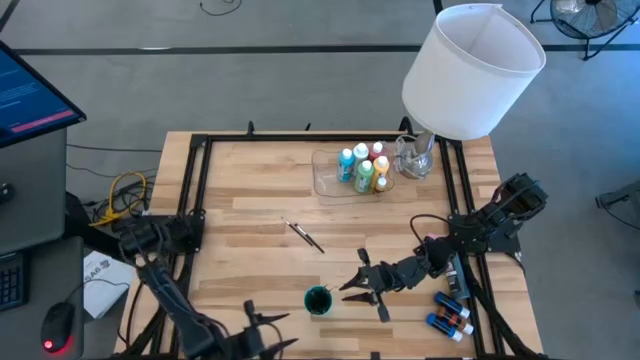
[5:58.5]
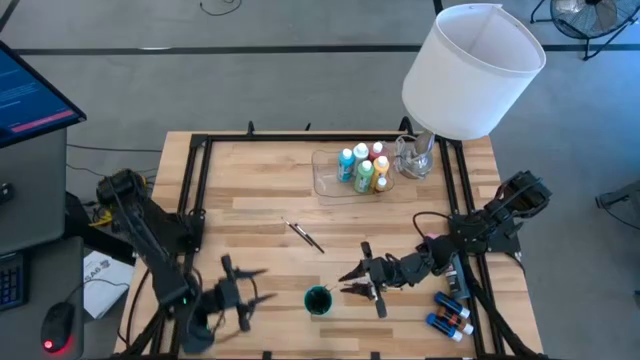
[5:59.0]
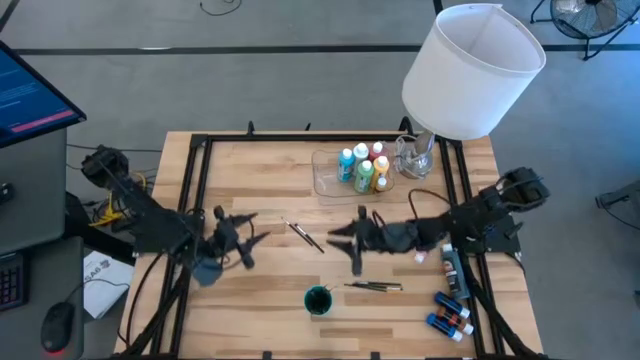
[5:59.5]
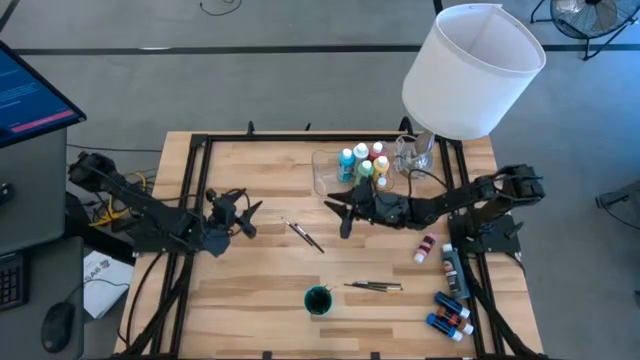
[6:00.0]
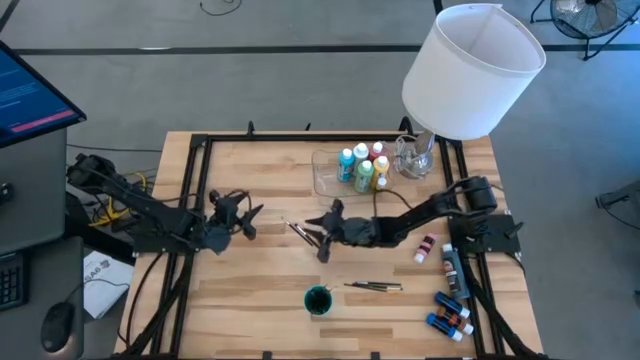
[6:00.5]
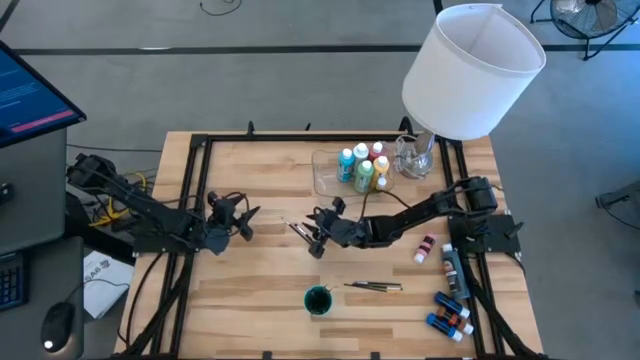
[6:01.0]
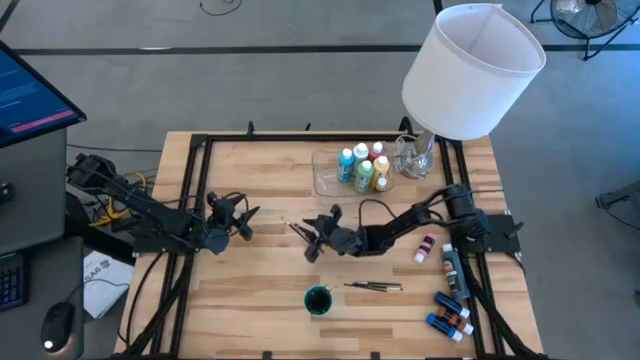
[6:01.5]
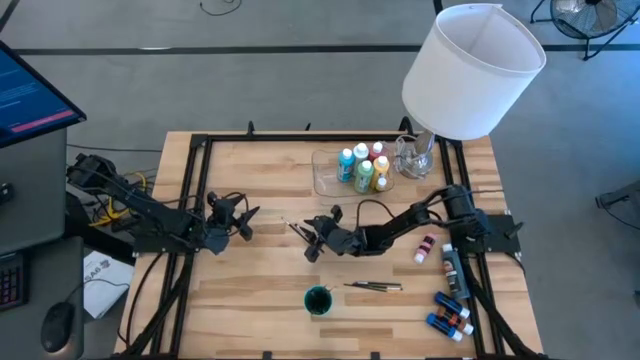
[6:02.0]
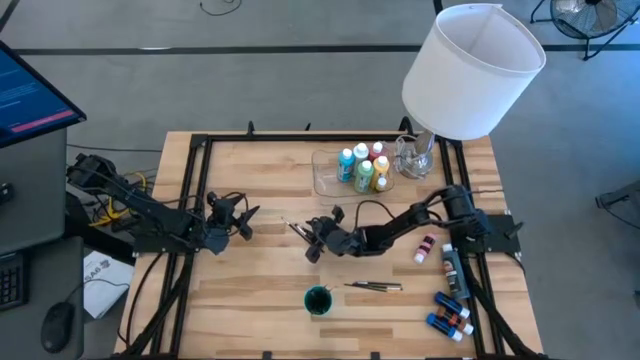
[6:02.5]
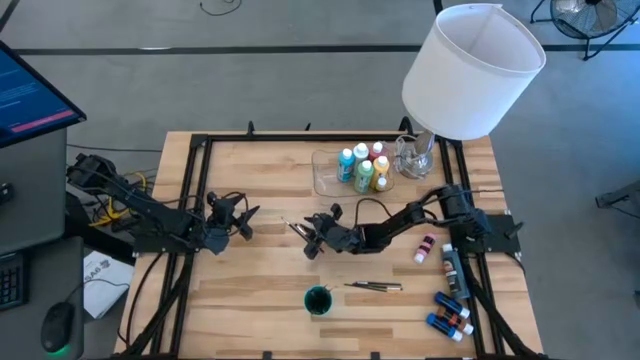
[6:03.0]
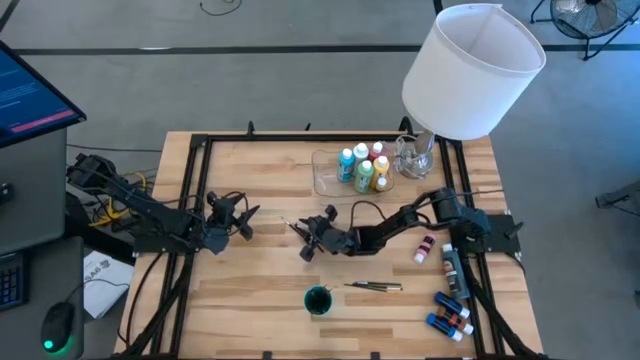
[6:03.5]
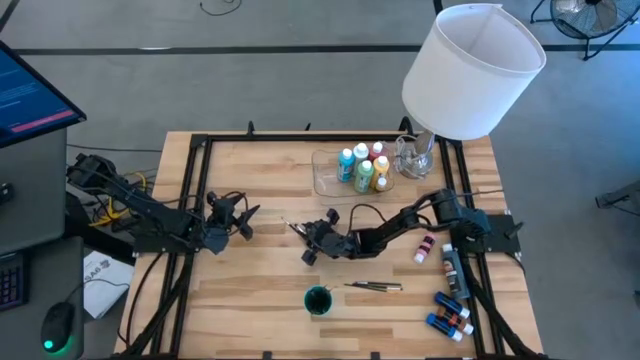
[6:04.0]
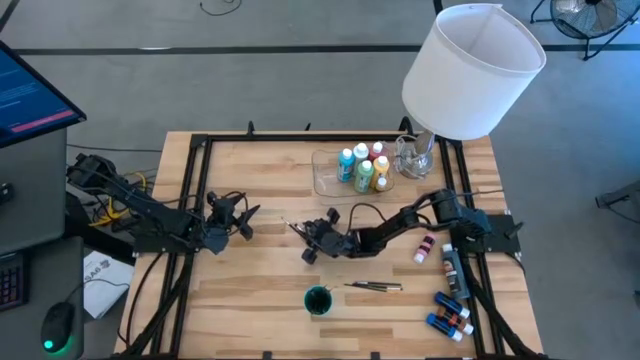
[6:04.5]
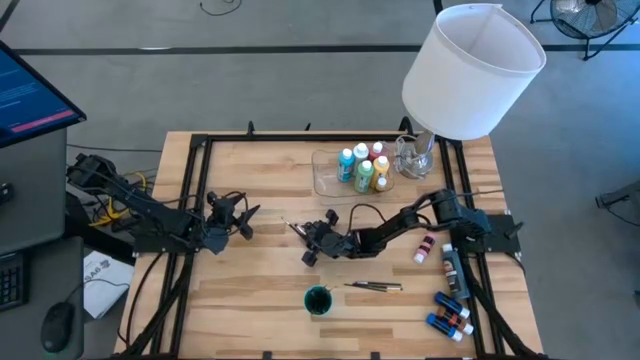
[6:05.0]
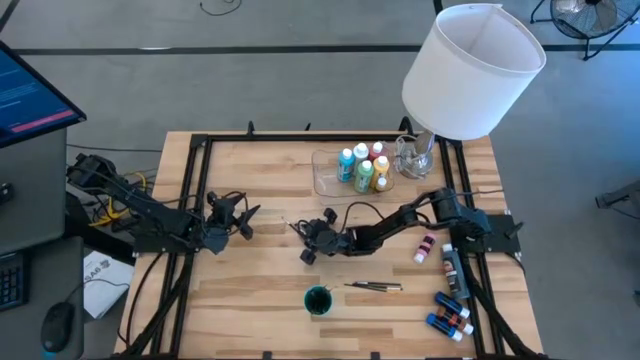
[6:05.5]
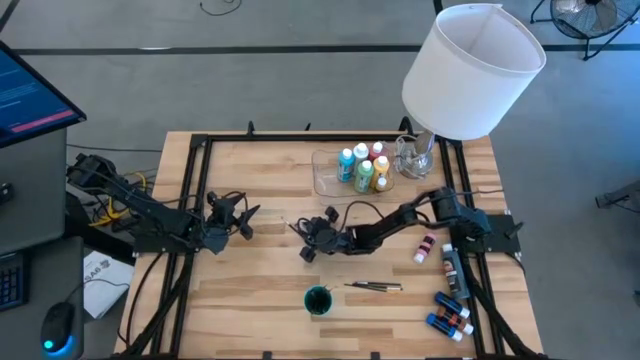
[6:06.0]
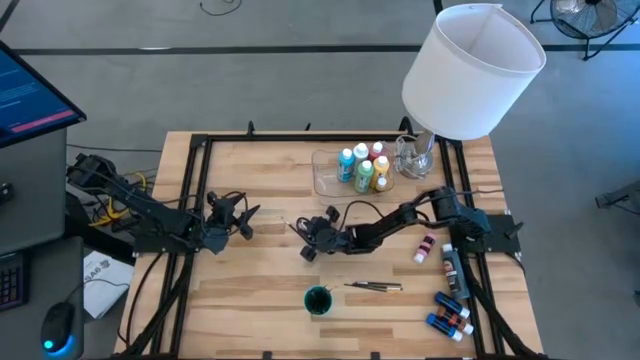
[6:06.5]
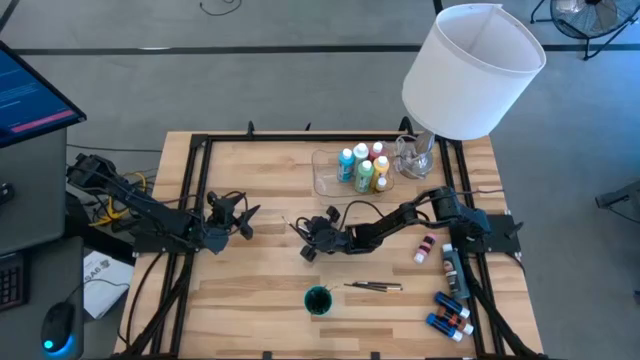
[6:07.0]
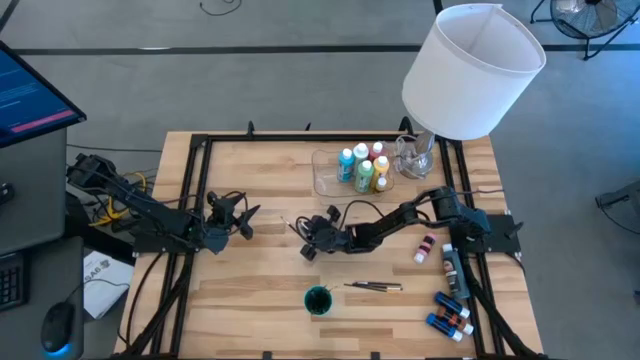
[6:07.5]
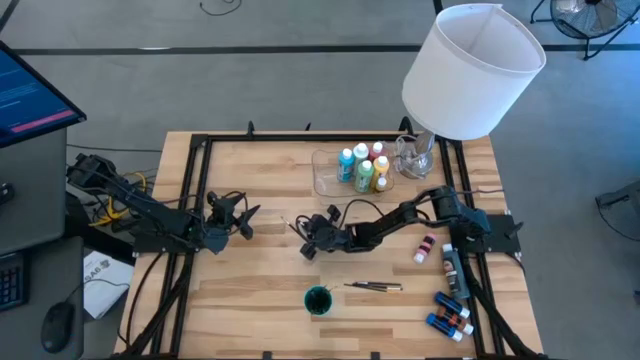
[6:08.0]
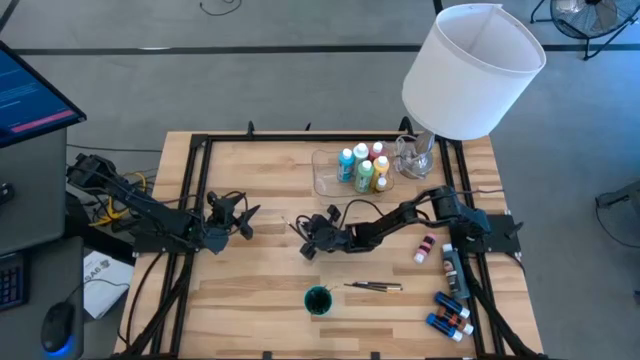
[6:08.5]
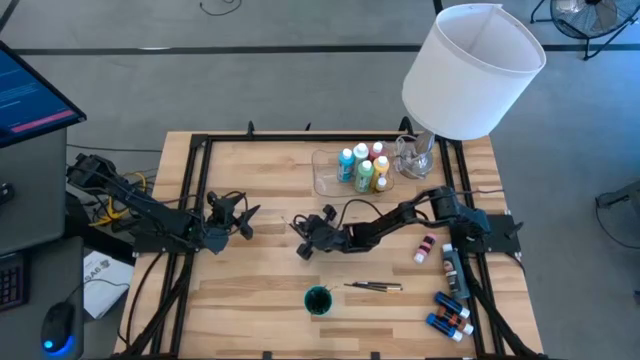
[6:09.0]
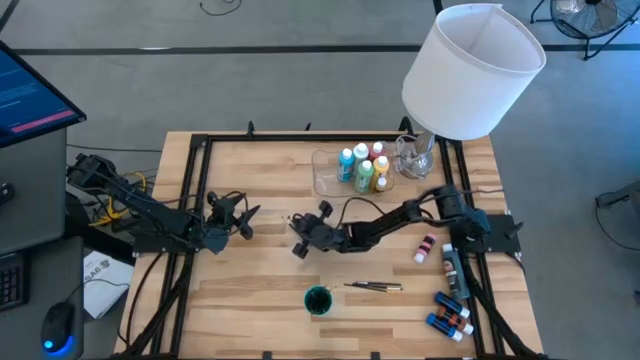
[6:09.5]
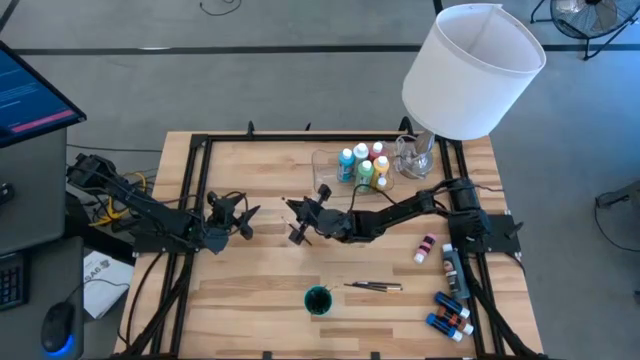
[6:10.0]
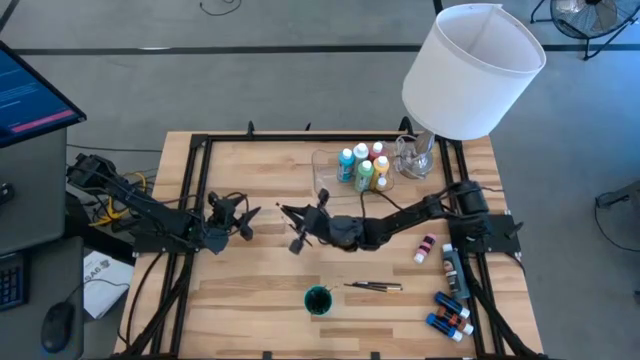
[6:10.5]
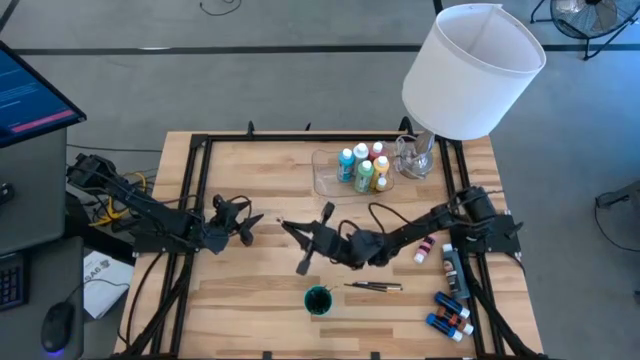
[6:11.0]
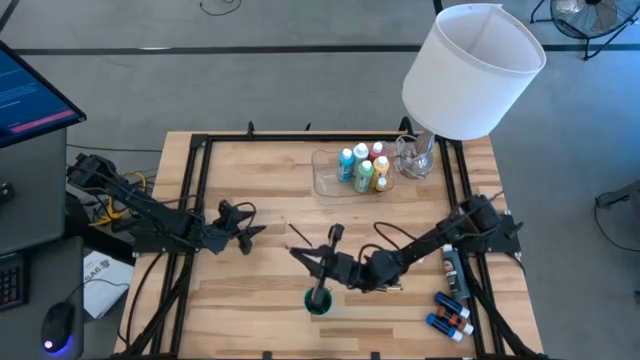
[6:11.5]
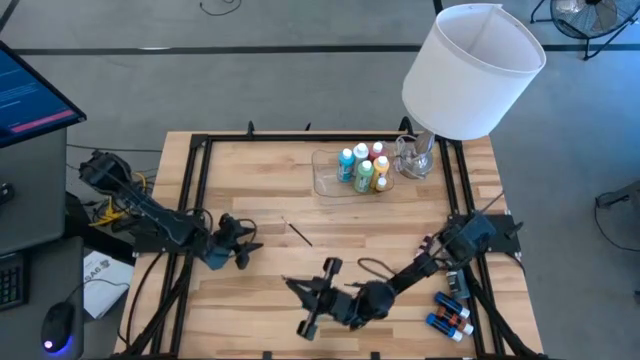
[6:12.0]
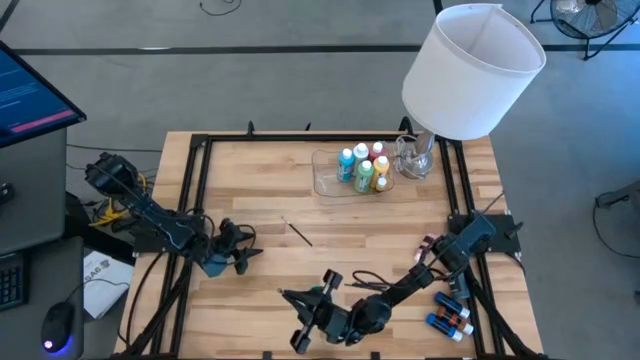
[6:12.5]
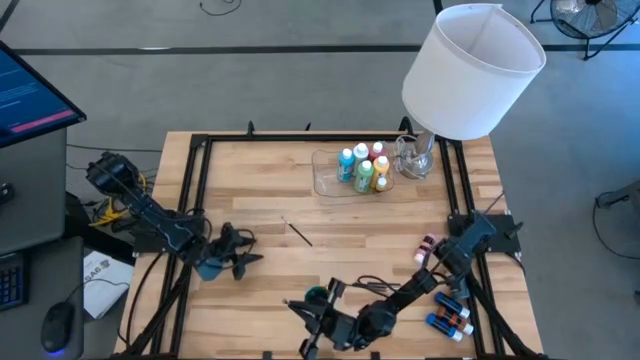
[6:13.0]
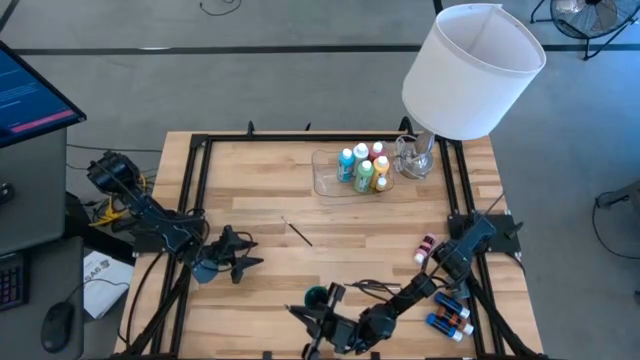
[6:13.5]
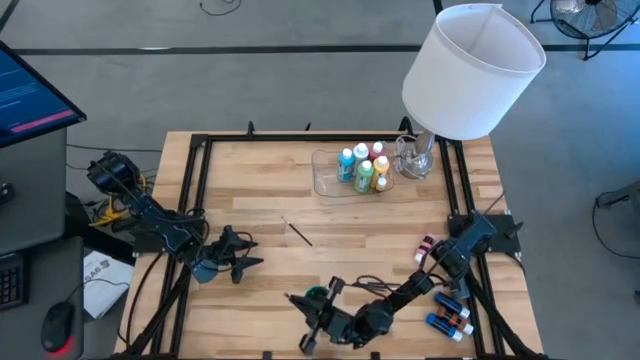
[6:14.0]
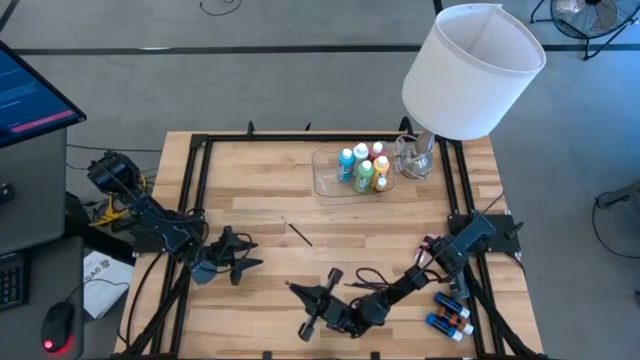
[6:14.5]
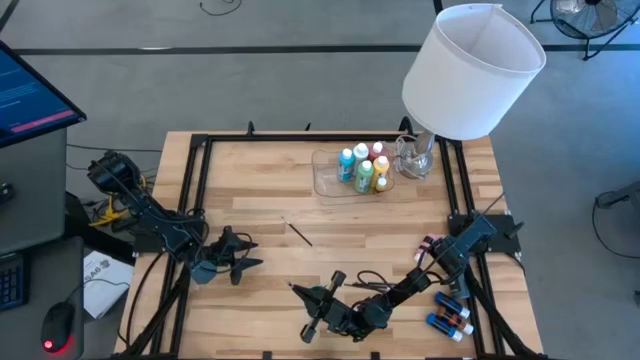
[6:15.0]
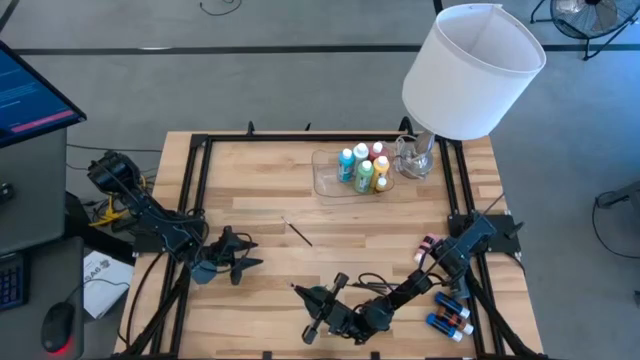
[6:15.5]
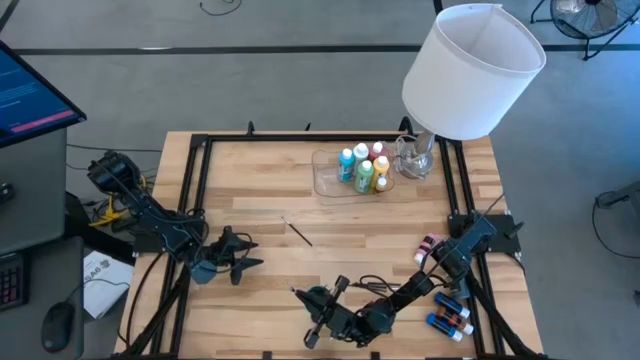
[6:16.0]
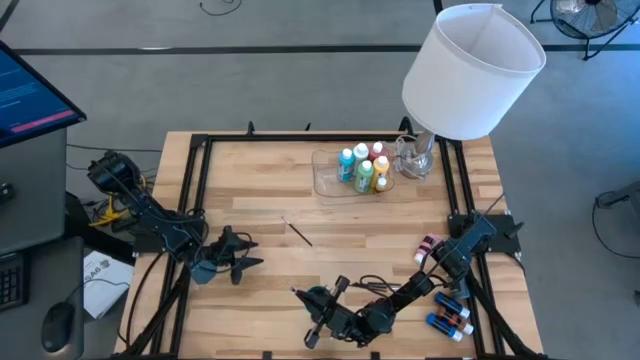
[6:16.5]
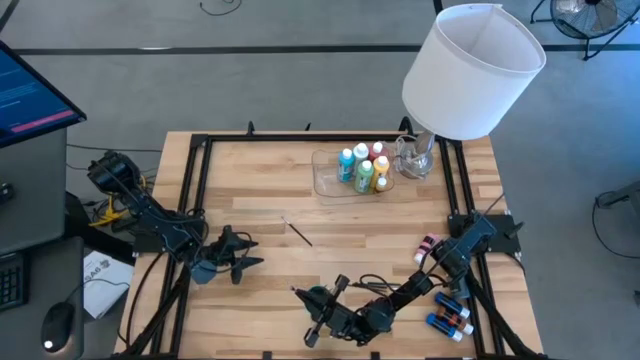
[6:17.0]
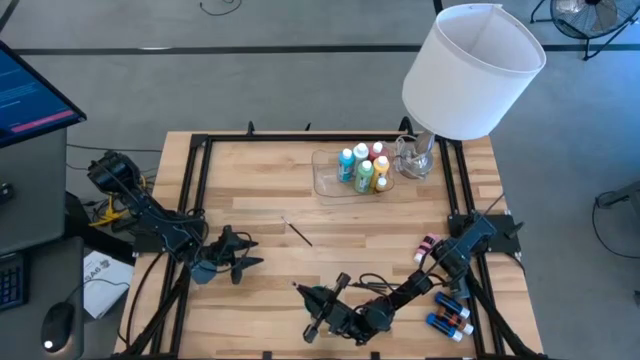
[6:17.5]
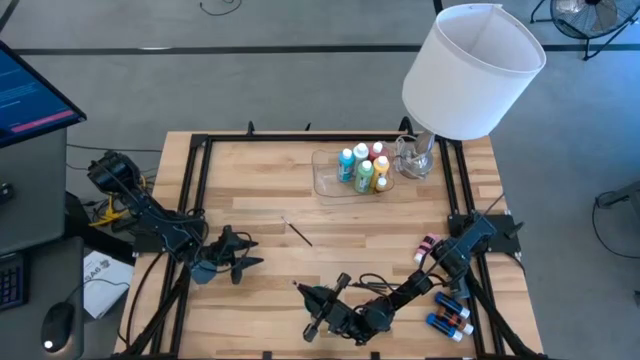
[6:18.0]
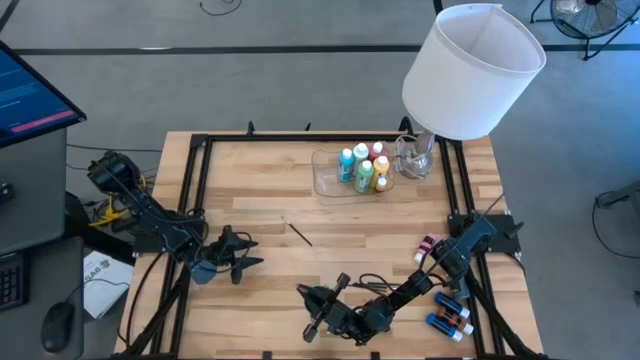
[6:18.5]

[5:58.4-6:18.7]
Task: Pick & Place Paint Supplies
Put the silver paintbrush into the green cup
